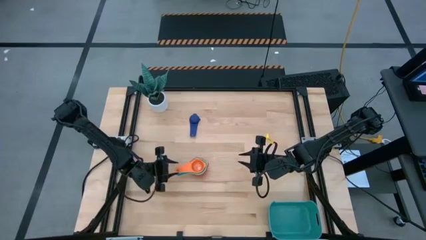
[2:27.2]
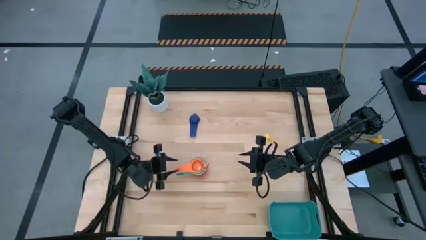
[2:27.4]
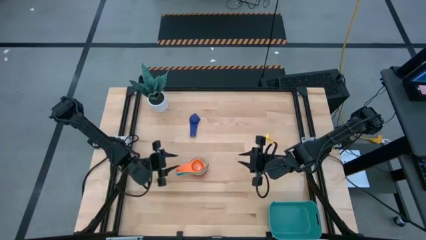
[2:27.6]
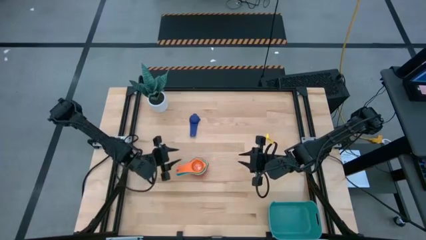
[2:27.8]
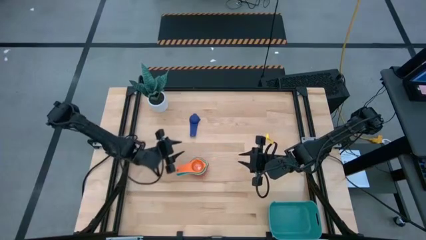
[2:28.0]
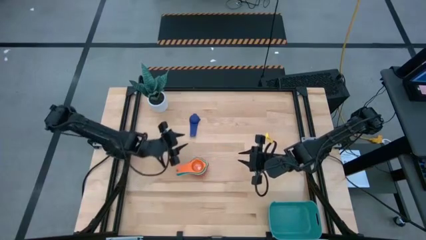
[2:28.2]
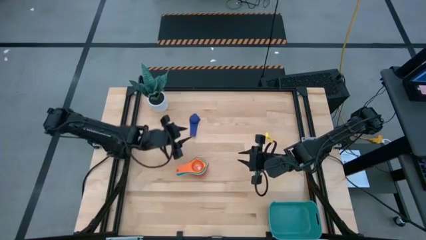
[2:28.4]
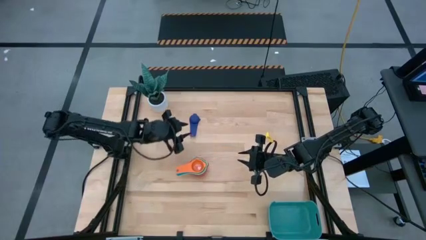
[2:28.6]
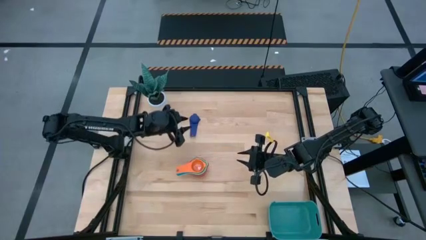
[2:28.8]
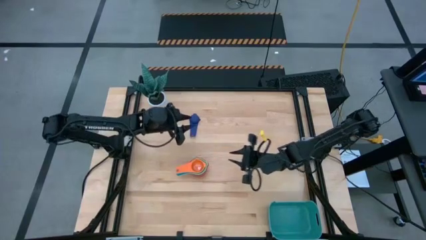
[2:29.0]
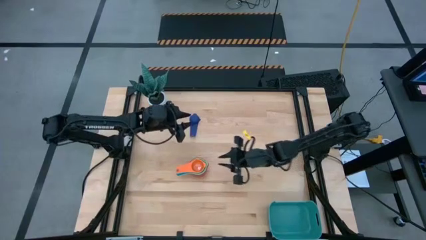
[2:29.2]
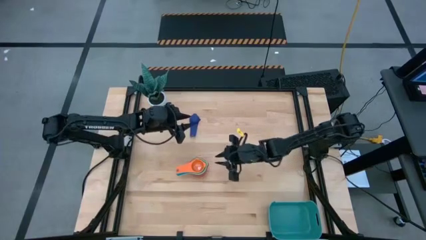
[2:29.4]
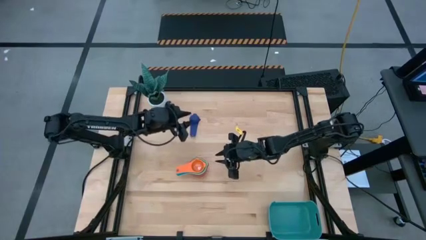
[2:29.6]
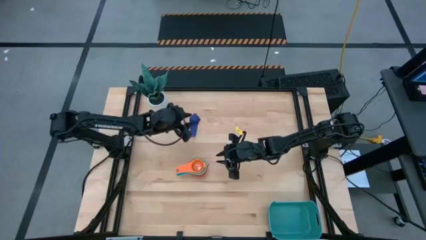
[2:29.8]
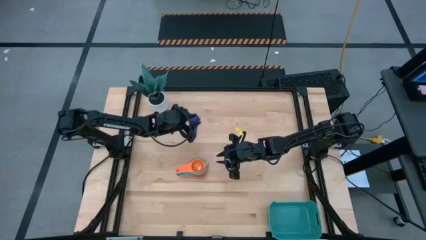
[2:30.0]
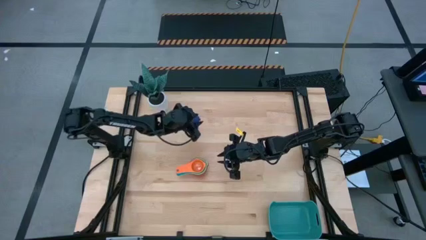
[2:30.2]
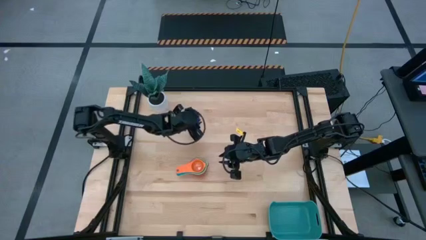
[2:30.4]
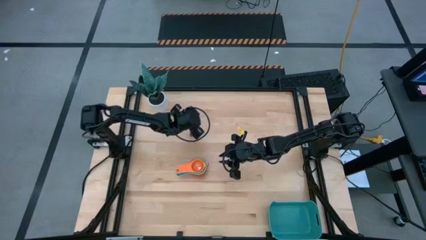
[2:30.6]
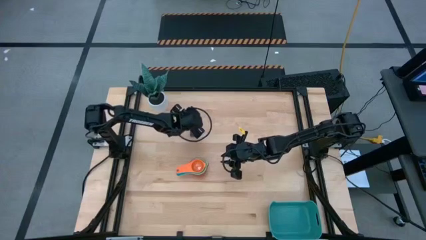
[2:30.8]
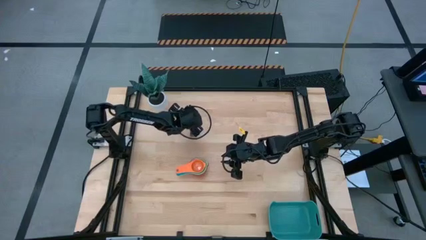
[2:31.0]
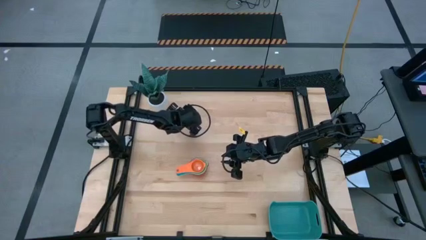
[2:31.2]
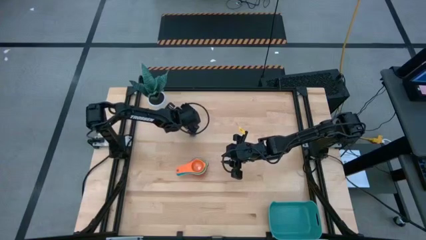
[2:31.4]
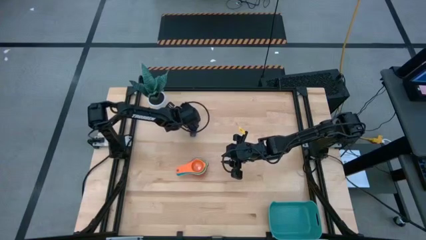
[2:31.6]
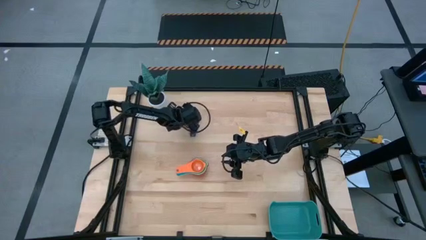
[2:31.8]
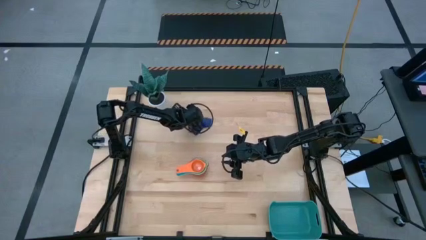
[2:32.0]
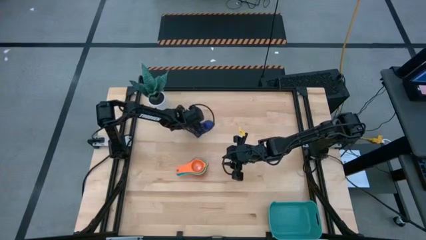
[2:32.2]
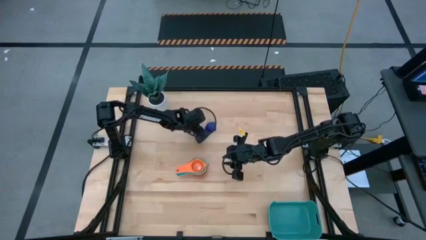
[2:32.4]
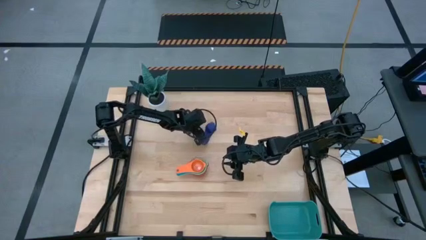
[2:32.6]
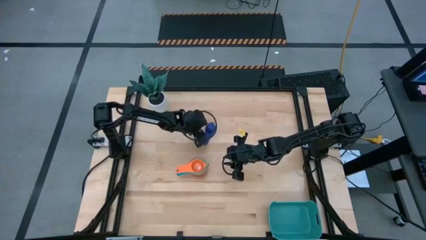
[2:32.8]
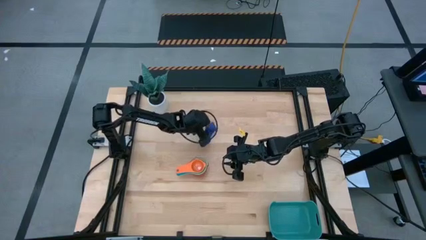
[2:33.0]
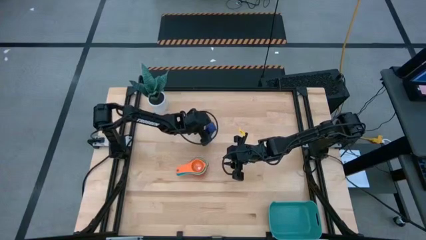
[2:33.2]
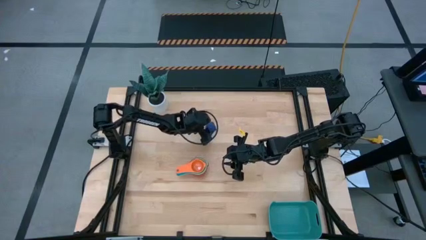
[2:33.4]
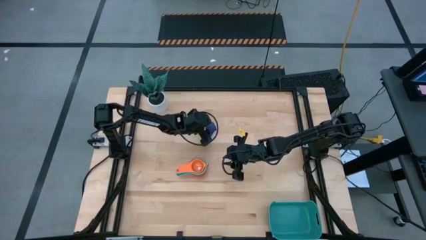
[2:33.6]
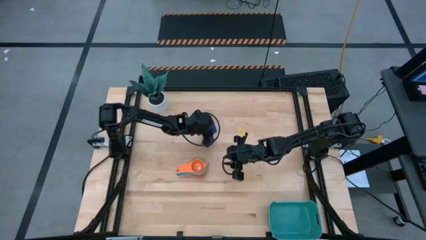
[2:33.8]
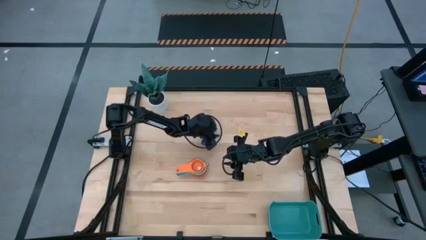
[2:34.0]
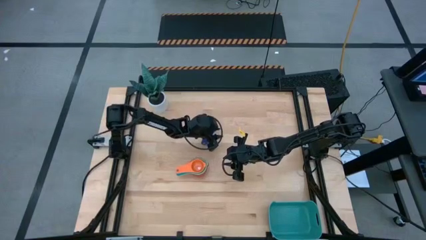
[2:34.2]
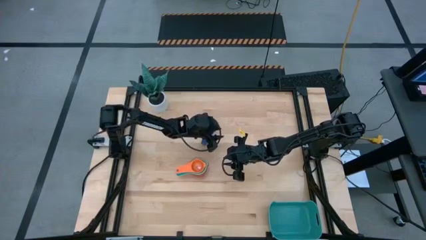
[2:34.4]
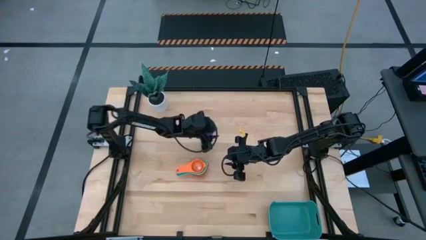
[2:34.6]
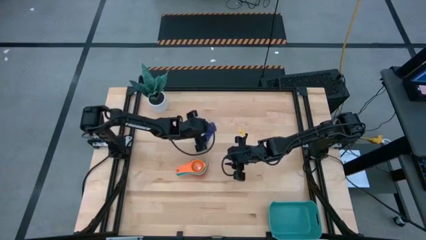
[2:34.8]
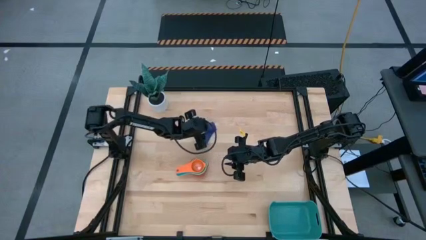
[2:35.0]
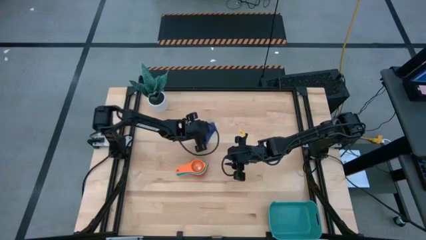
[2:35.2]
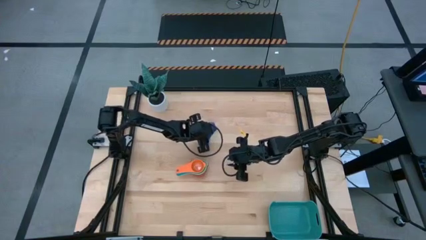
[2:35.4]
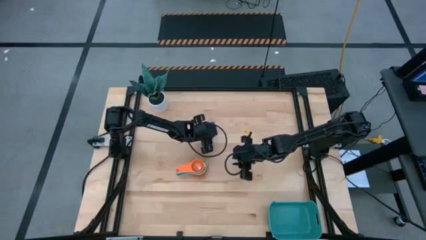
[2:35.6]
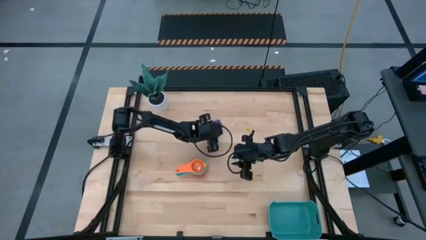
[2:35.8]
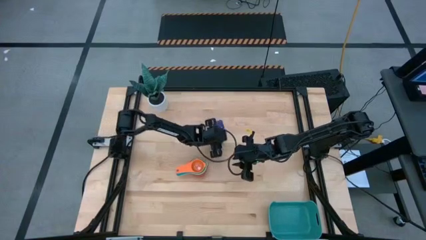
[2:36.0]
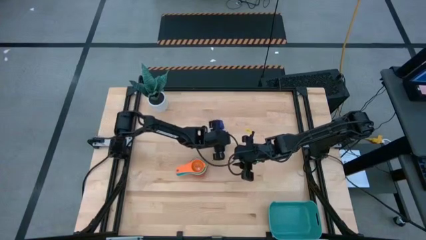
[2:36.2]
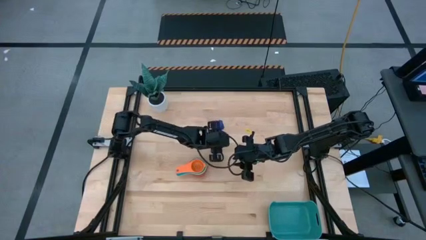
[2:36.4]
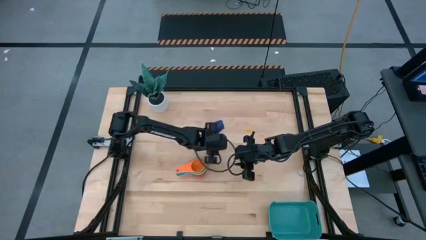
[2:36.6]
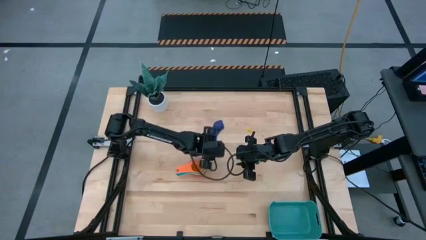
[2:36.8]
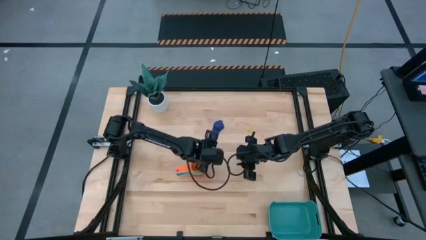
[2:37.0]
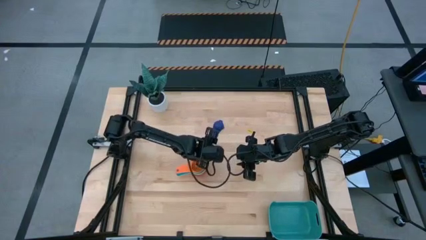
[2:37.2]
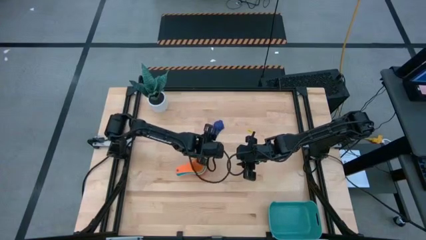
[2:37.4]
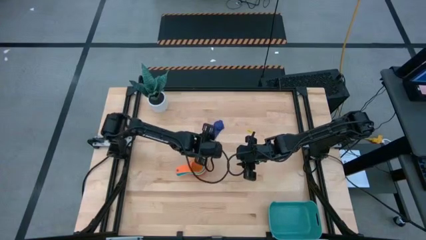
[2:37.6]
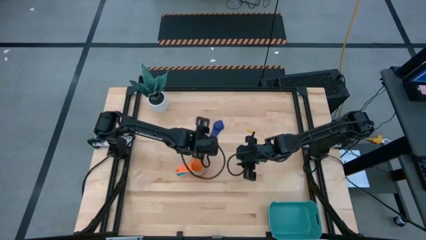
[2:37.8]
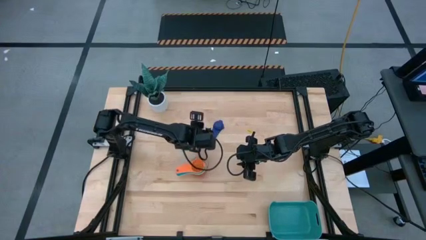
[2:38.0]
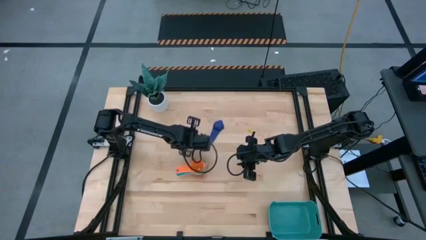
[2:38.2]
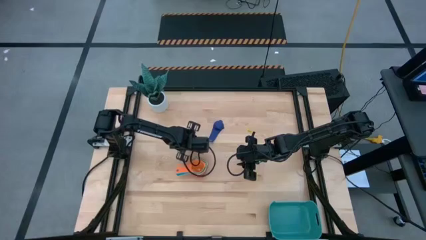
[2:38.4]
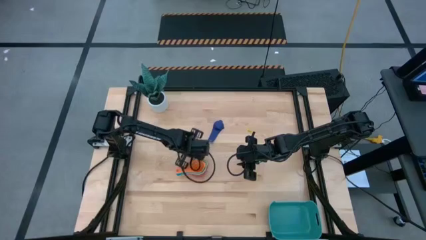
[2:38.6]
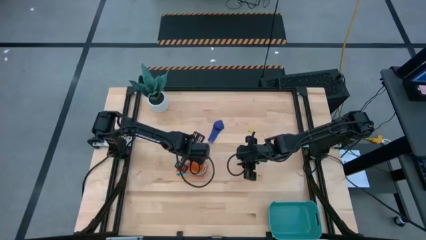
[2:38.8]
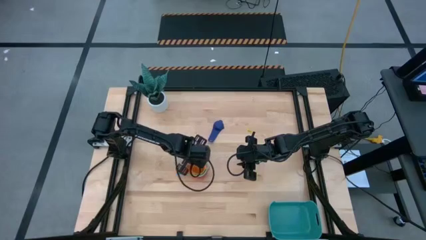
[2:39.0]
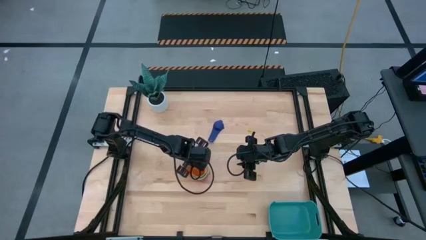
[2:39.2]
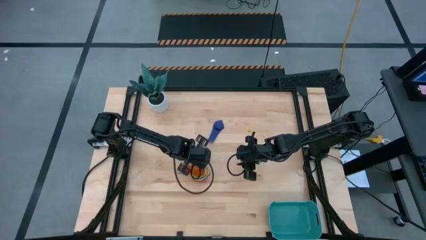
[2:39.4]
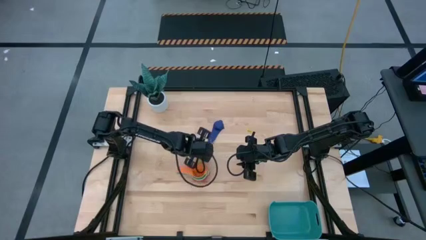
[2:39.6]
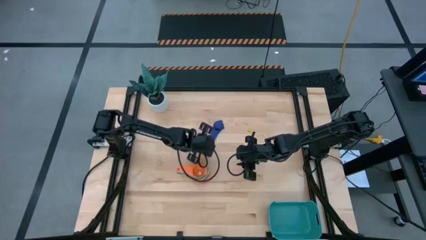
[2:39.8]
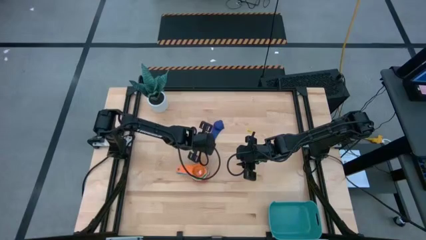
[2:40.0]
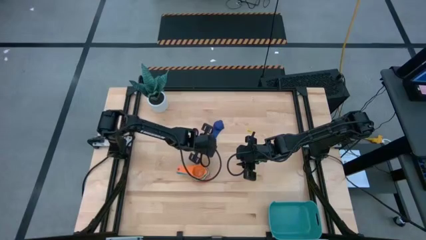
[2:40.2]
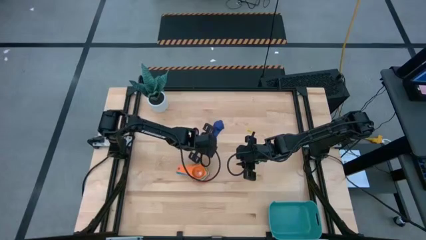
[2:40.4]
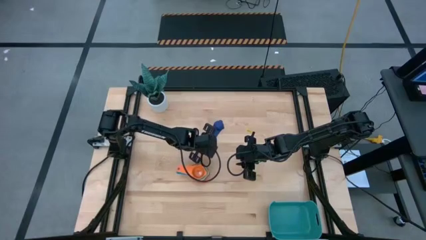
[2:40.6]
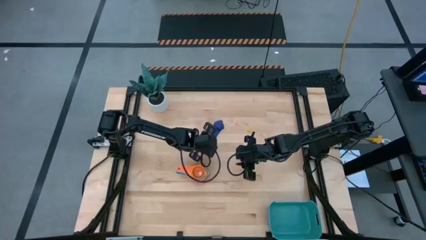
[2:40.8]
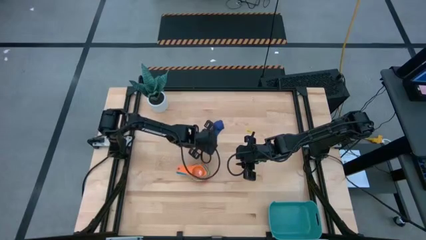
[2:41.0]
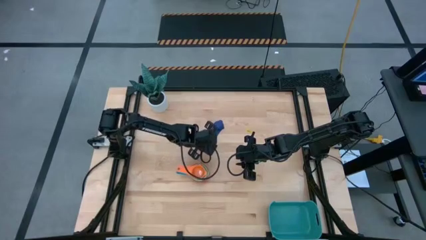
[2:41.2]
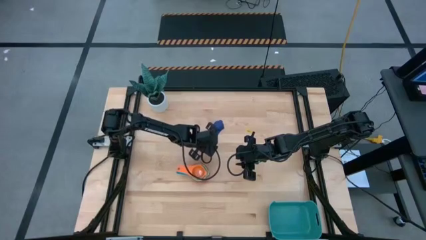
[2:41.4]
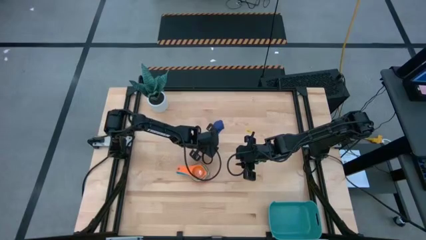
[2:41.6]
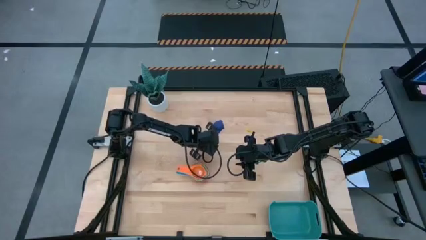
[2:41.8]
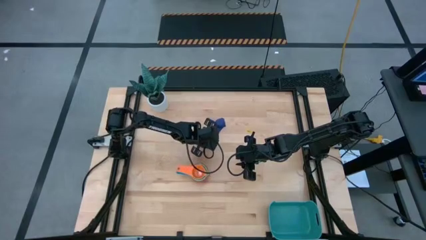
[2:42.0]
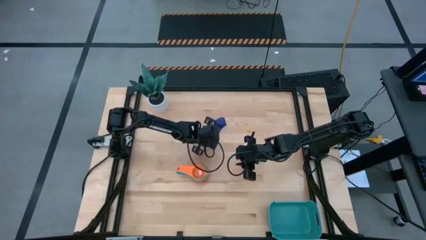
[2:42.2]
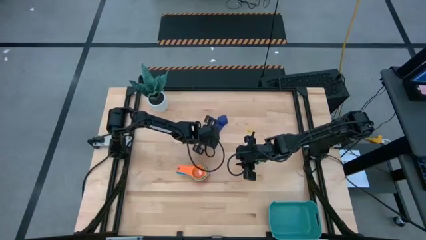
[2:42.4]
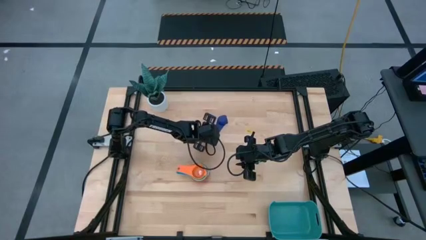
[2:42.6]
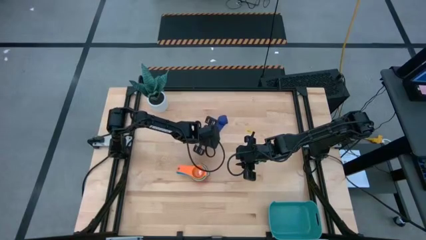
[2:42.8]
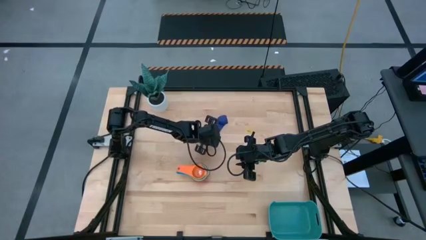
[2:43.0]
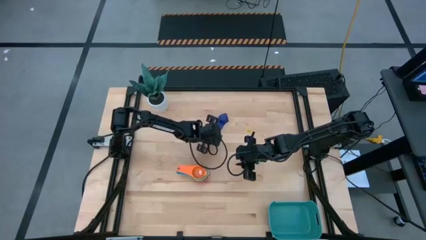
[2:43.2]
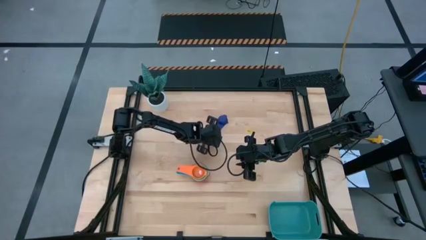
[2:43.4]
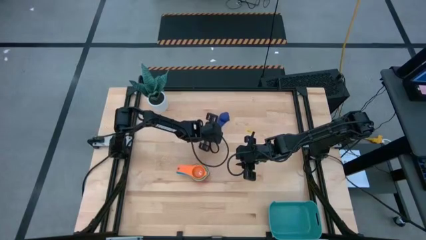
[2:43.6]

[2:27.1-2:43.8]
Task: Nest measuring cups in basket
Stack the dark blue measuring cup on top of the orange measuring cup

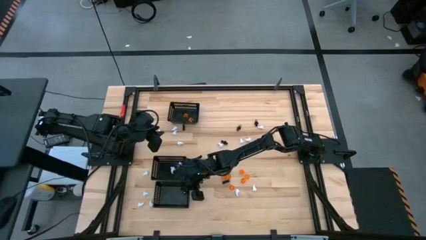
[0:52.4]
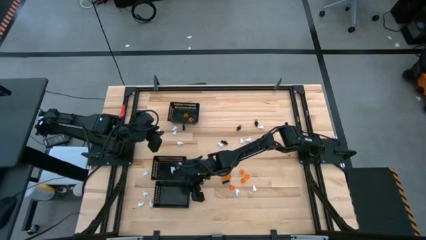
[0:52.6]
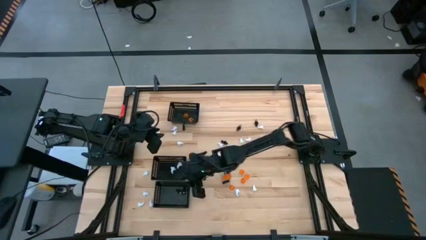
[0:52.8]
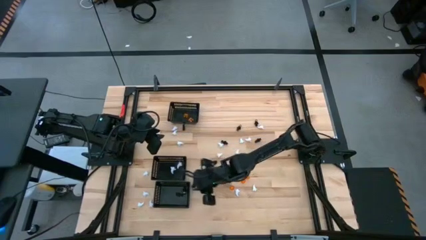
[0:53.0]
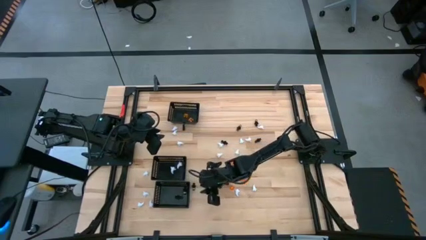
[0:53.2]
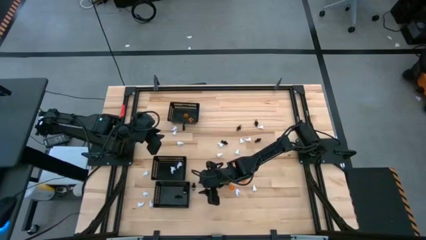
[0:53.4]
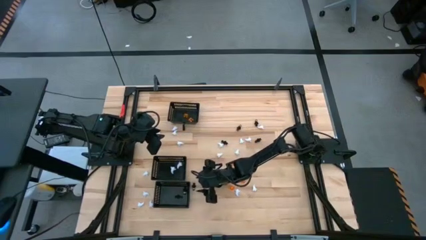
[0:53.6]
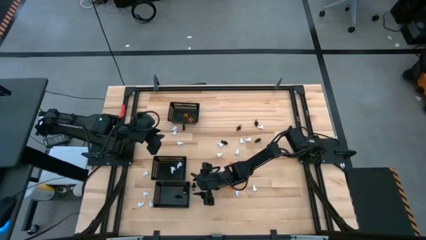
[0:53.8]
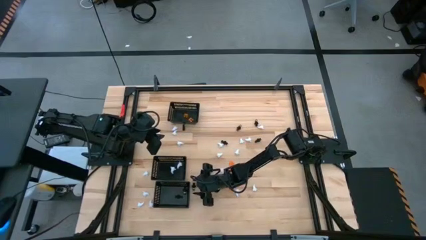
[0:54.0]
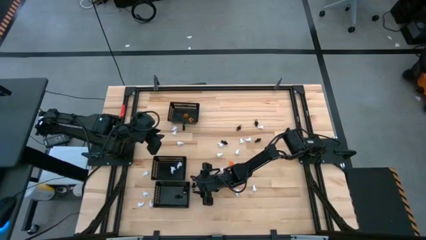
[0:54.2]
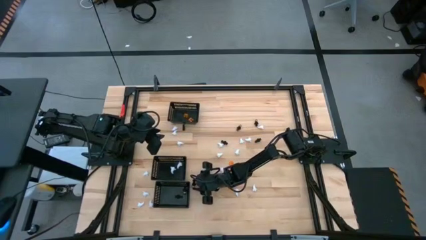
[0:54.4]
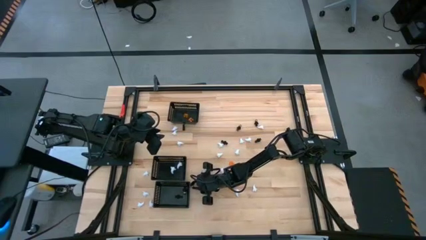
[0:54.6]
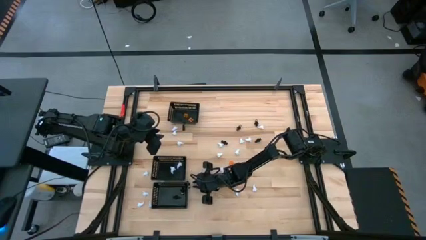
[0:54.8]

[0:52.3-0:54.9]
Task: Sort Halloween decoration
Put the black toy into the top black bin
